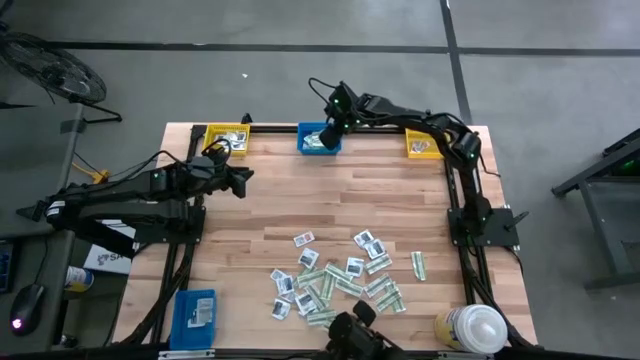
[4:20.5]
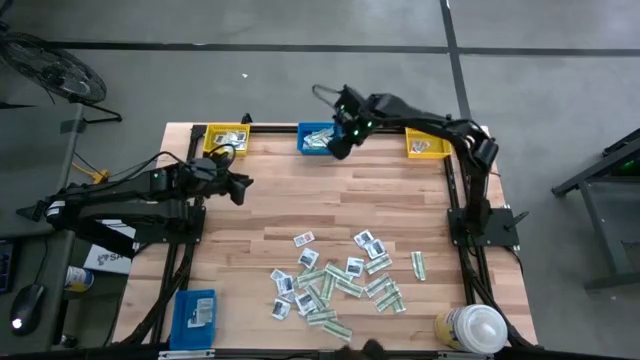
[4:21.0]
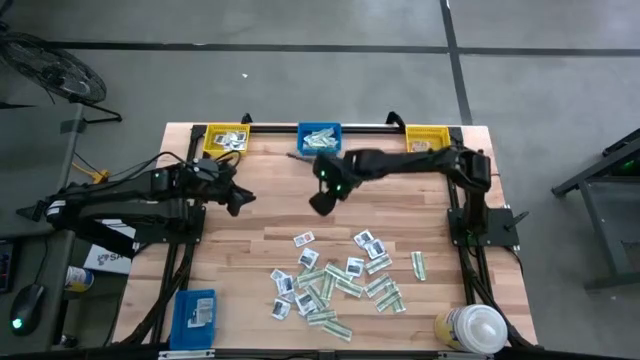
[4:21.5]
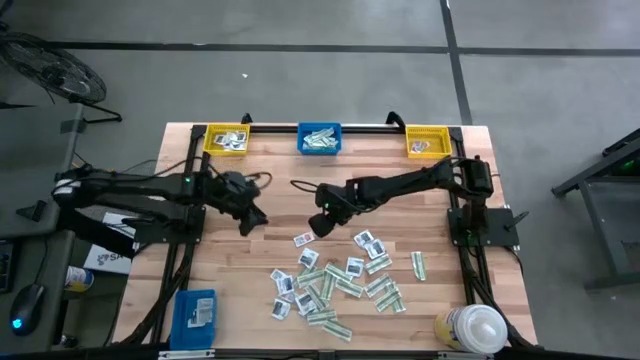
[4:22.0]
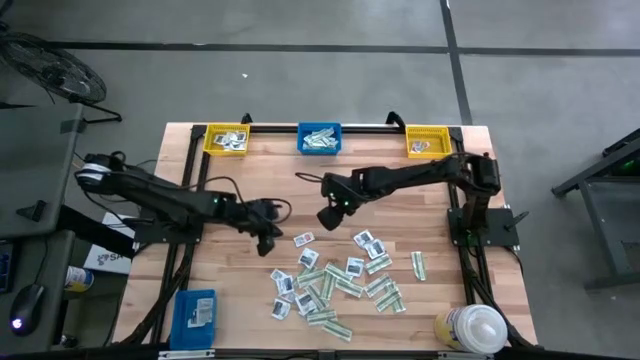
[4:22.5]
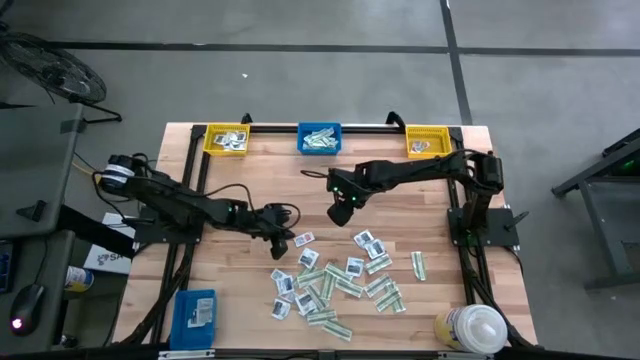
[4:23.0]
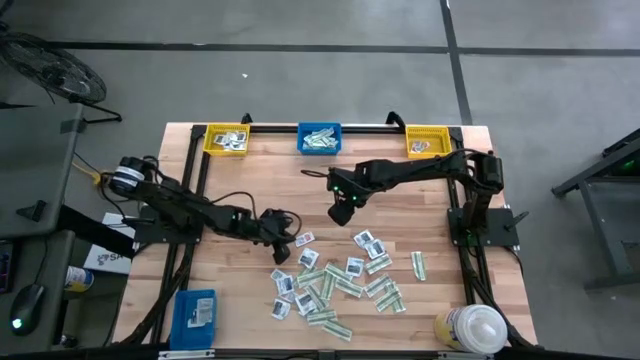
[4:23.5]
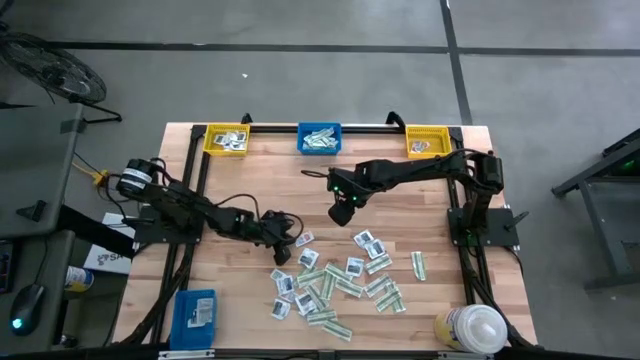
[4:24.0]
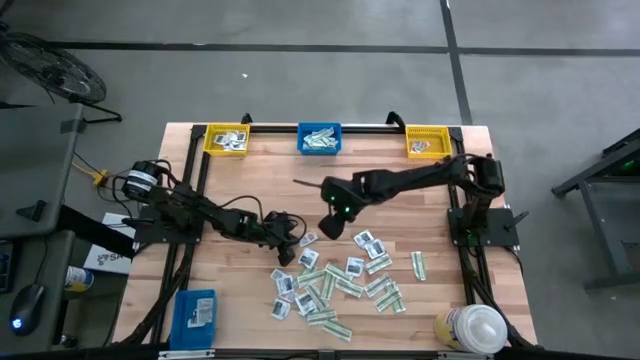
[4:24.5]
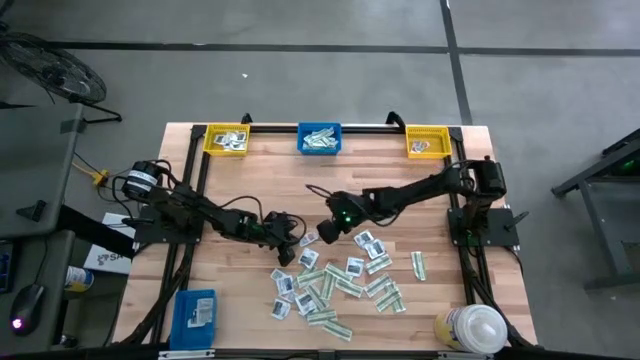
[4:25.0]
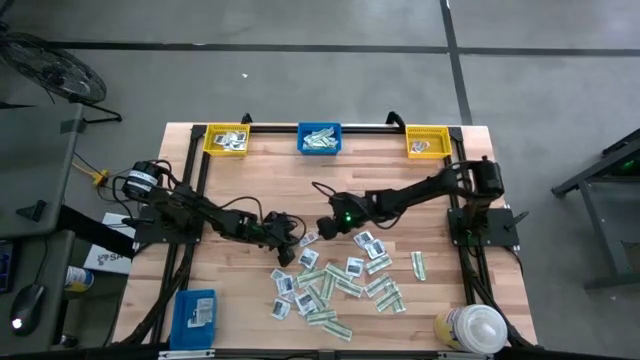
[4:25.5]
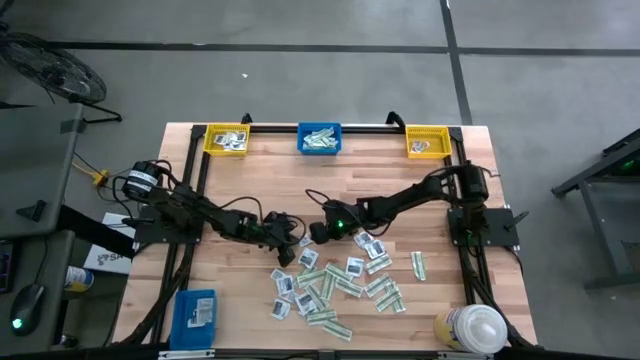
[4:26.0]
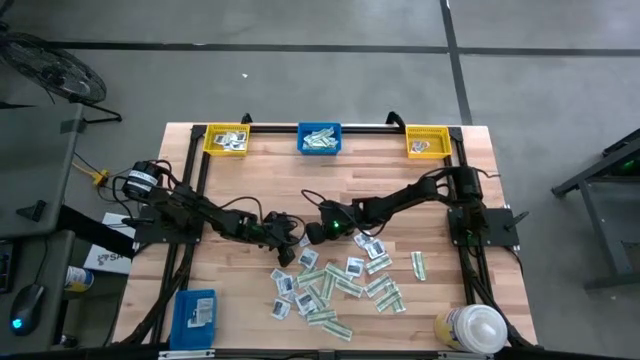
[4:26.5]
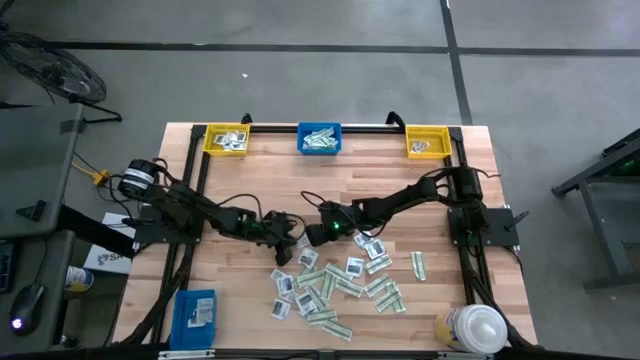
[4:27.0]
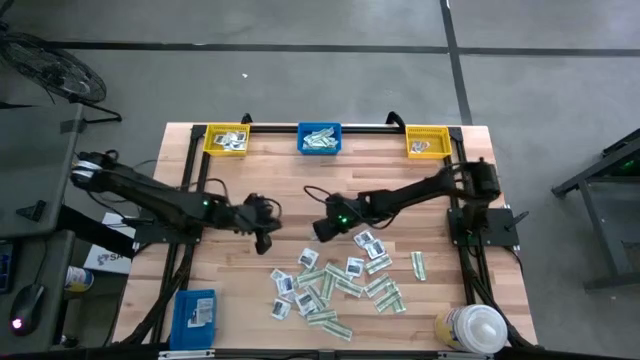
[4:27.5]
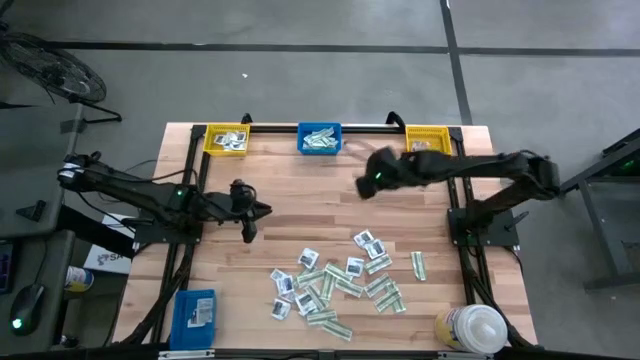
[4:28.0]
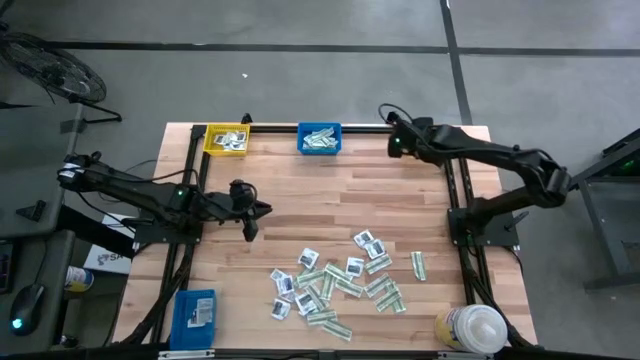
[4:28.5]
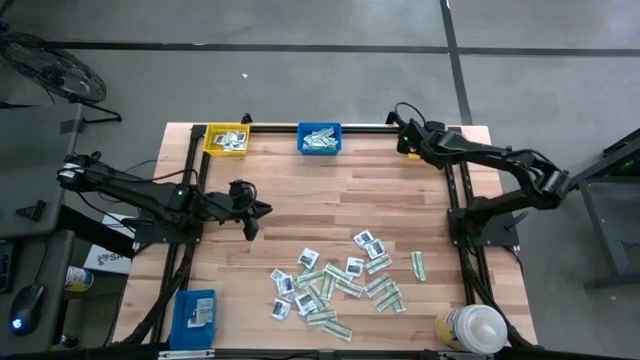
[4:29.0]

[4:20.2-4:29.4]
Task: Pick & Place First Aid Supplies
Put the orange ointment pack into the right yellow bin

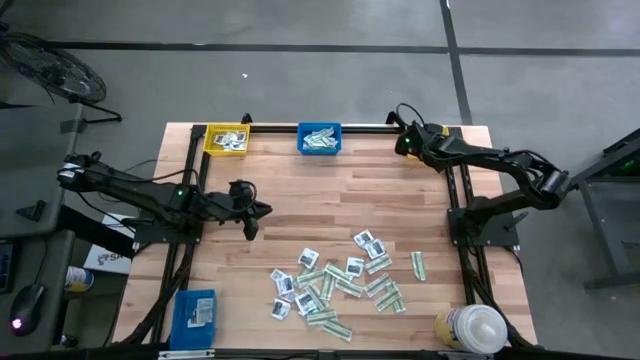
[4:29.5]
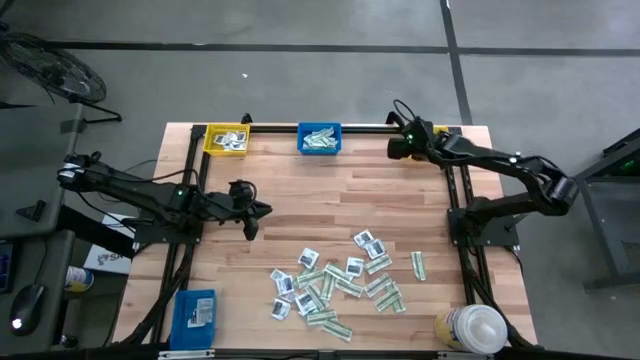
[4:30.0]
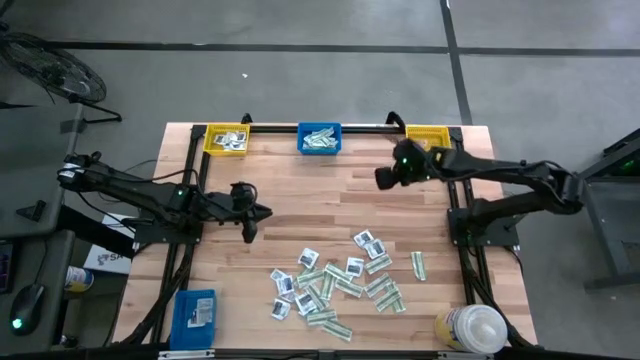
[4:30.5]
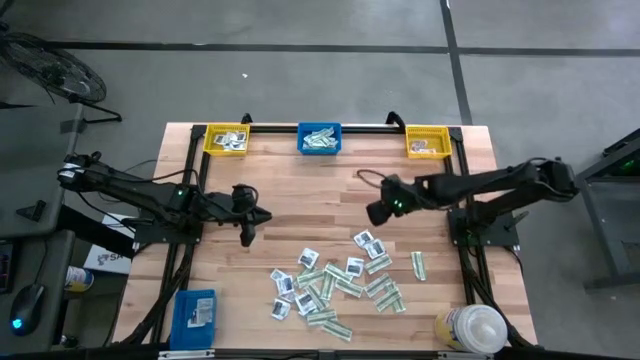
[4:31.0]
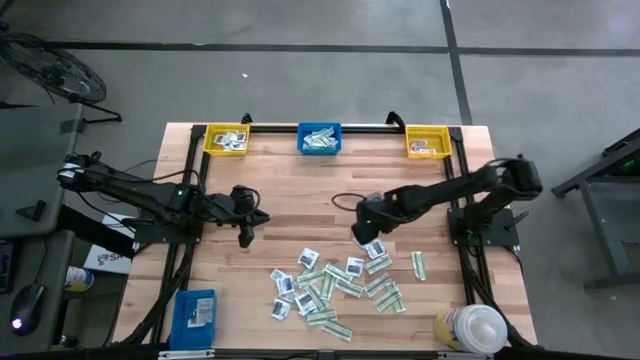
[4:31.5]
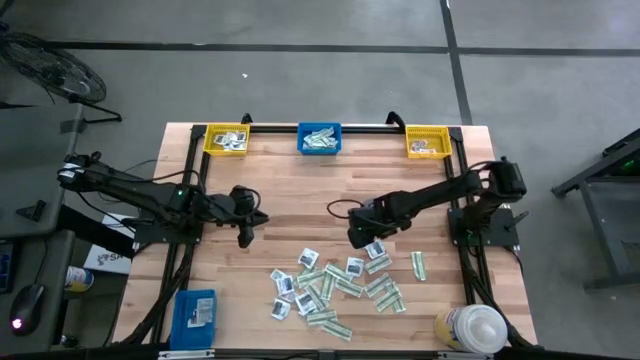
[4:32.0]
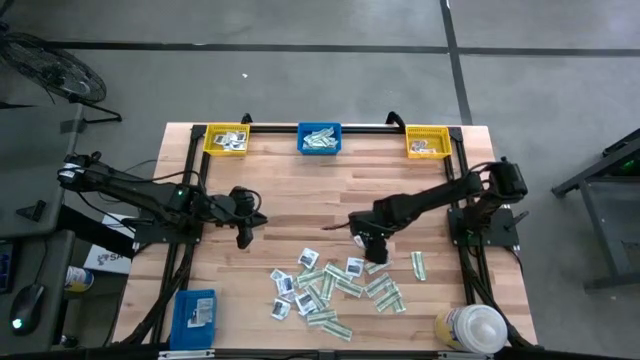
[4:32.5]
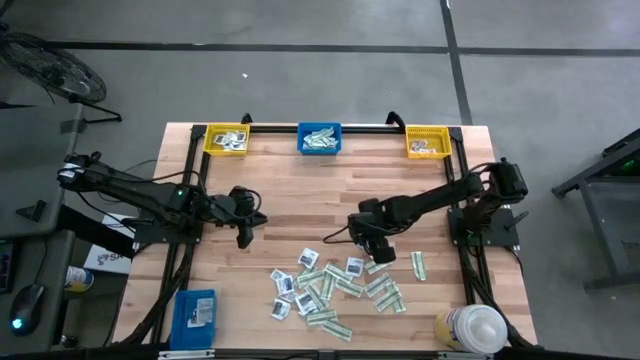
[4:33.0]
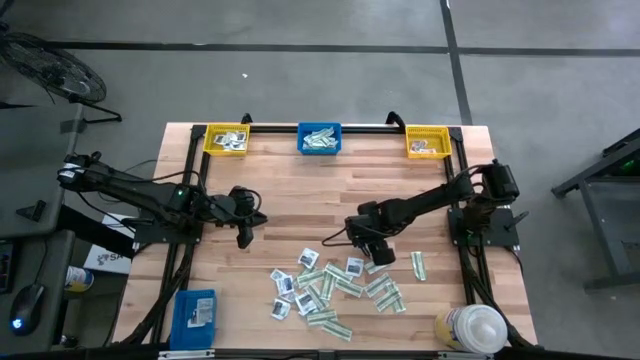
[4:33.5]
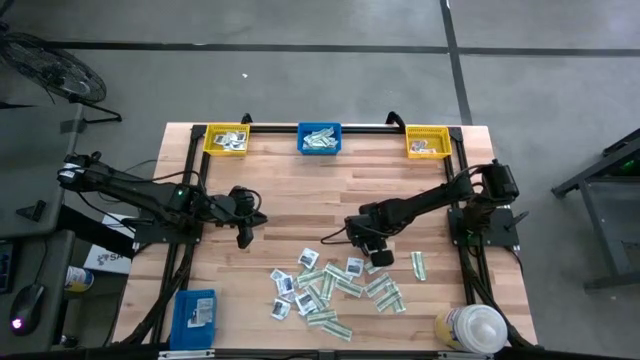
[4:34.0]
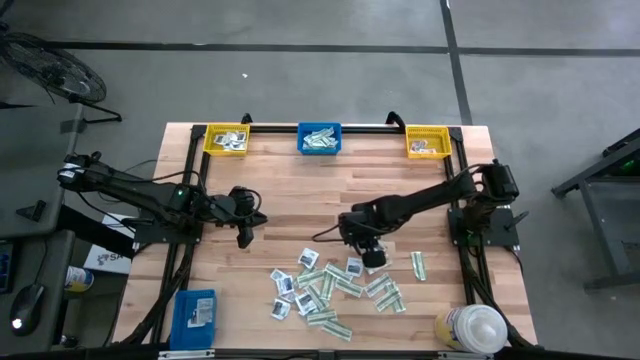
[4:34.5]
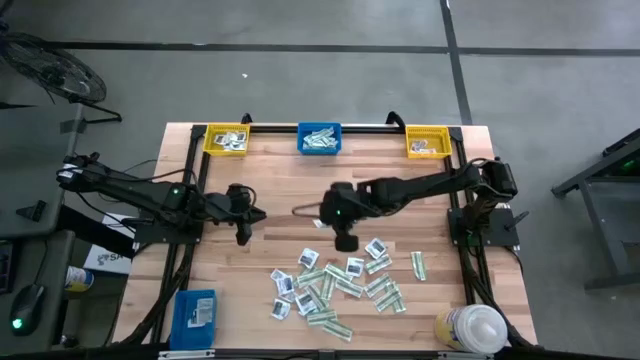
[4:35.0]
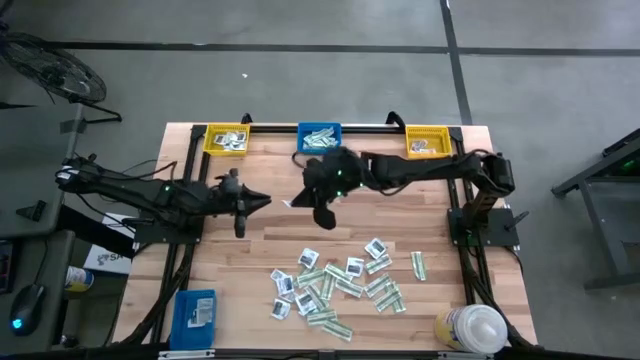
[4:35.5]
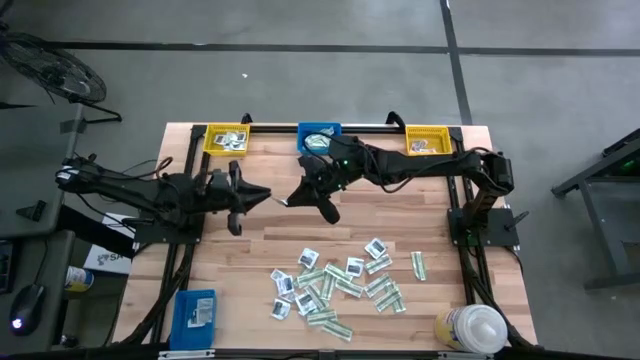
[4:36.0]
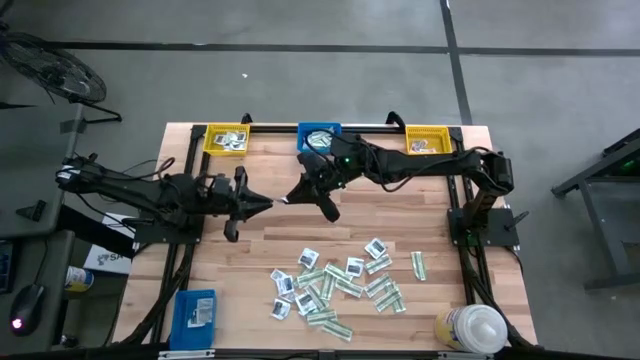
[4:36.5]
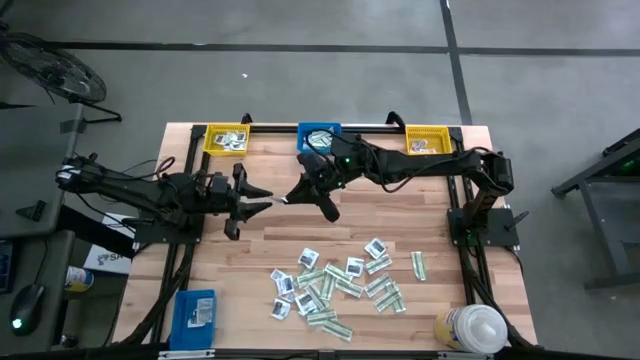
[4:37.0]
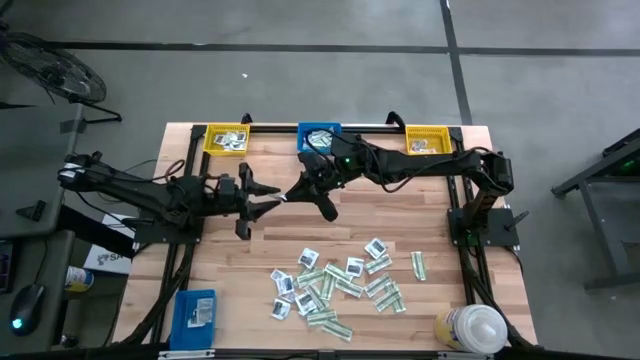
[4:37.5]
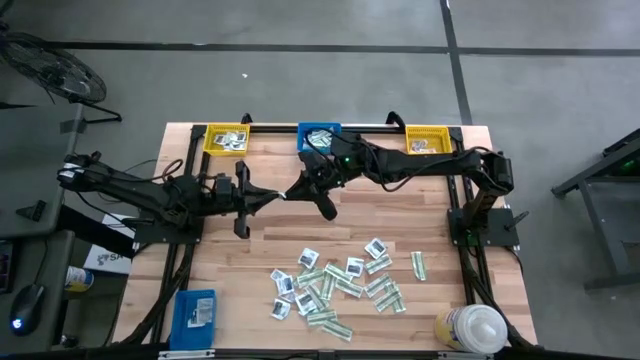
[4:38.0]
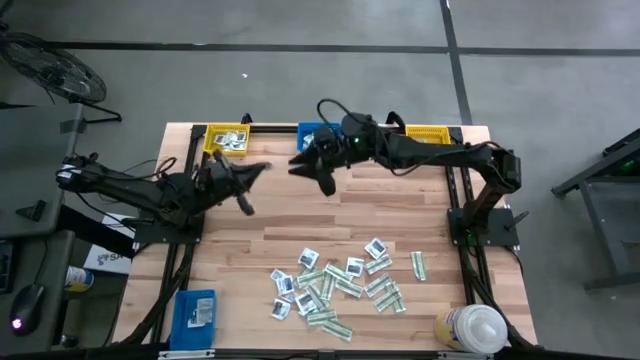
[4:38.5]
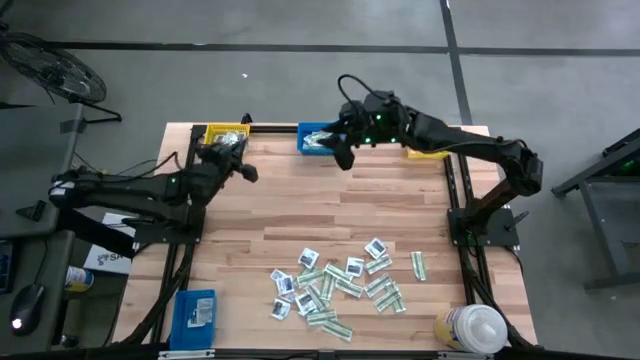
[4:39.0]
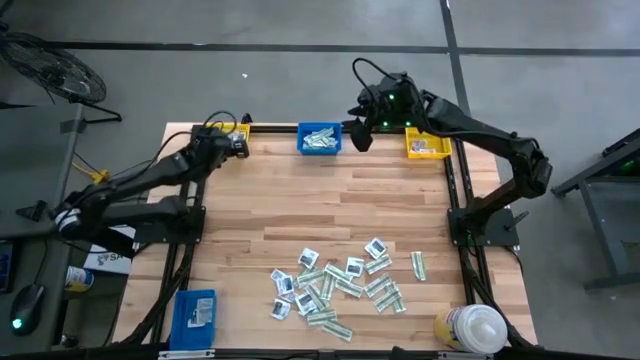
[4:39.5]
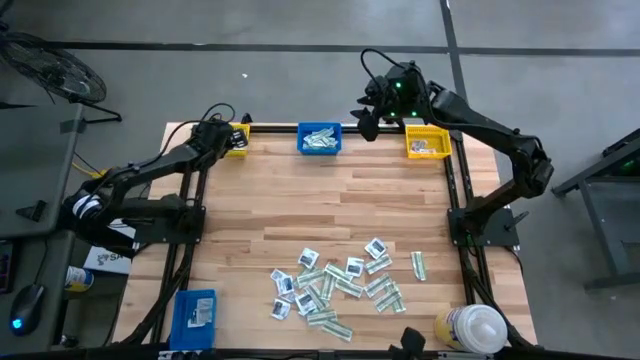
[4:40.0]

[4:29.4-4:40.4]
Put the gray towelette pack into the left yellow bin

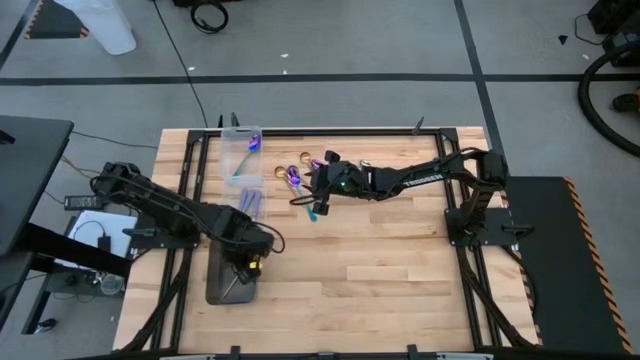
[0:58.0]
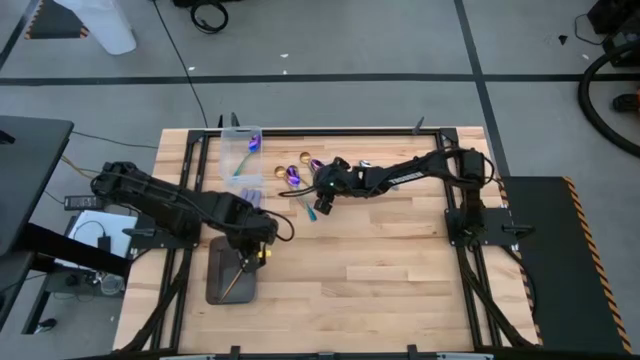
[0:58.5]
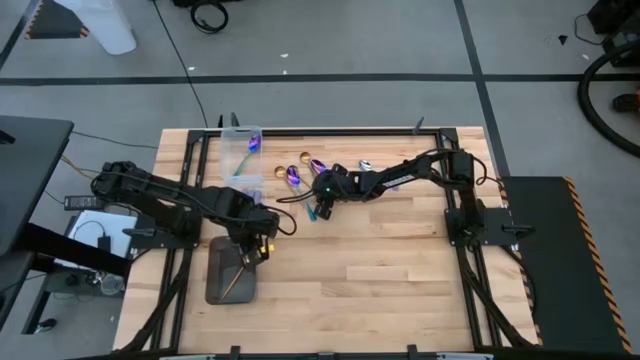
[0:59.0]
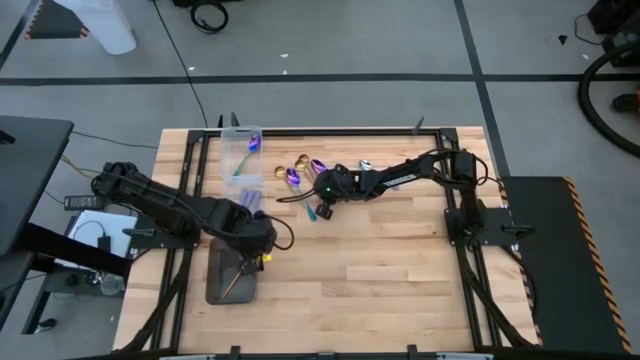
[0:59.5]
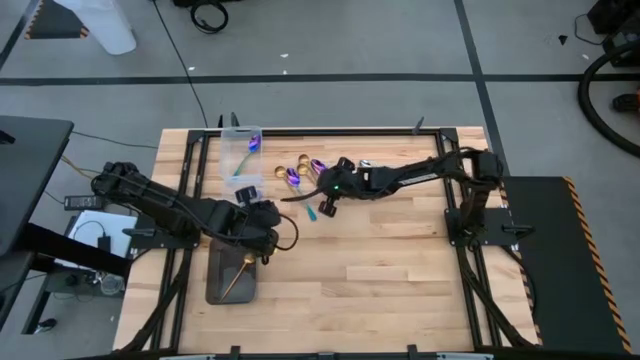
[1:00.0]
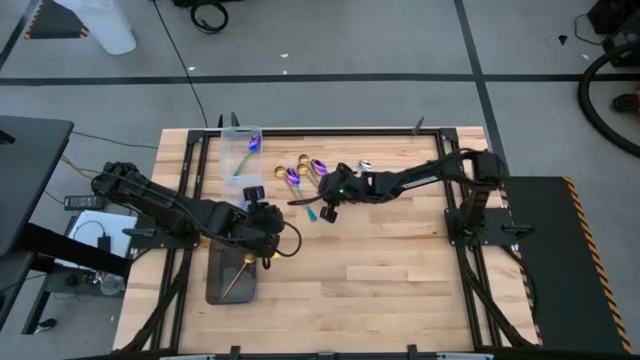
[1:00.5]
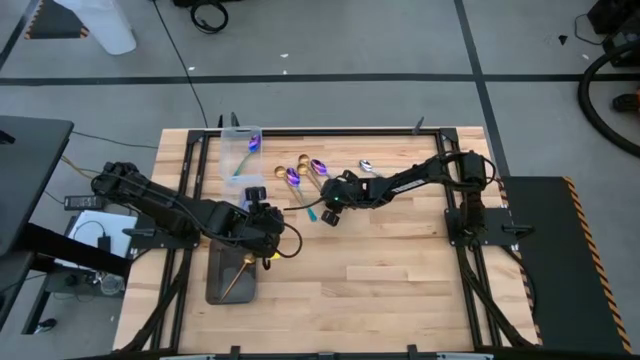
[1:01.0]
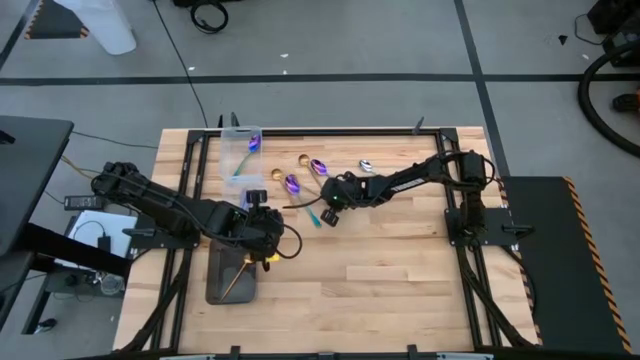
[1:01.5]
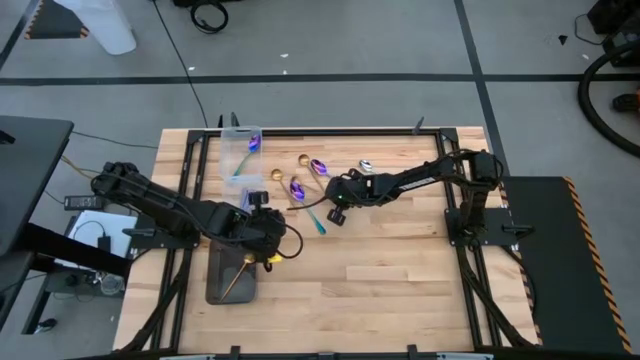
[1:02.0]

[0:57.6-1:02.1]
Task: Sort silverware by color (type)
Put the gold spoon into the black bin
